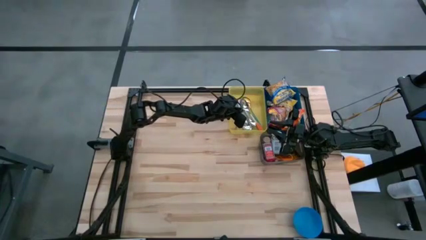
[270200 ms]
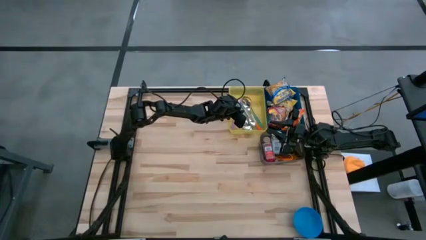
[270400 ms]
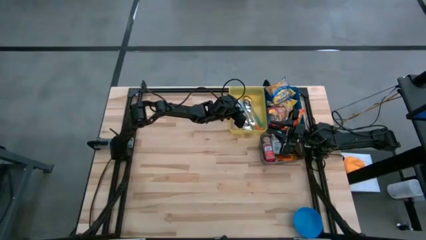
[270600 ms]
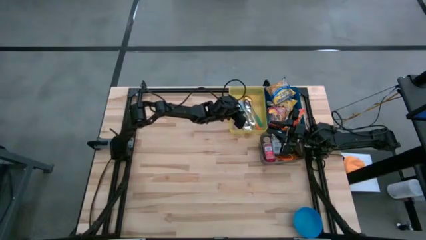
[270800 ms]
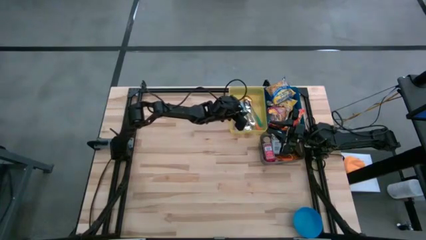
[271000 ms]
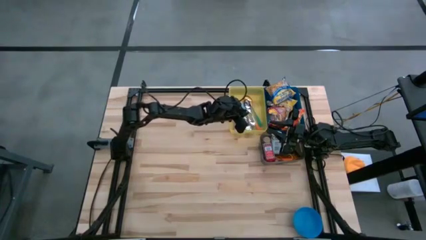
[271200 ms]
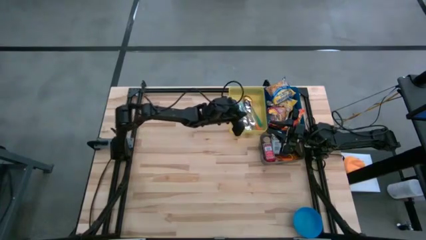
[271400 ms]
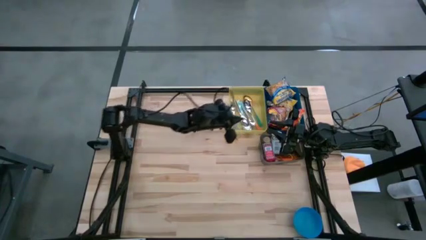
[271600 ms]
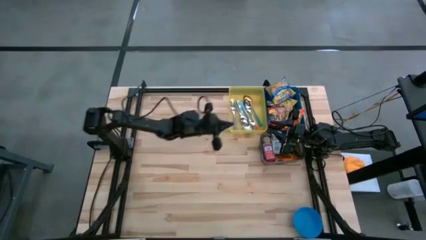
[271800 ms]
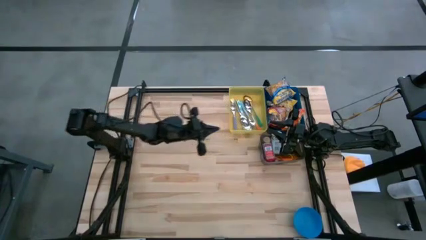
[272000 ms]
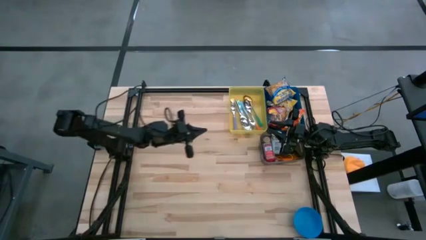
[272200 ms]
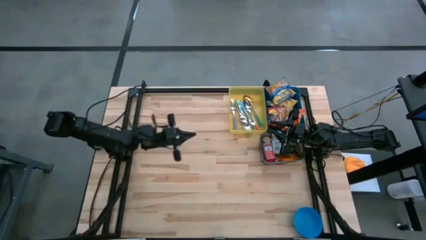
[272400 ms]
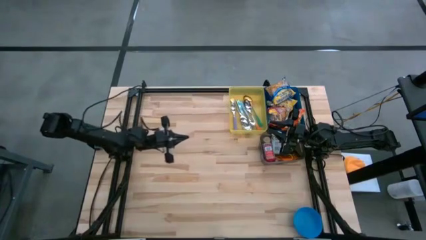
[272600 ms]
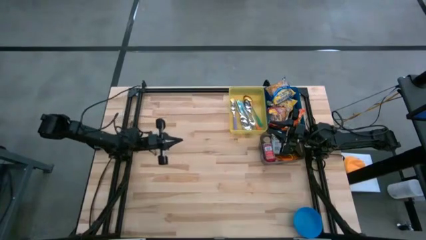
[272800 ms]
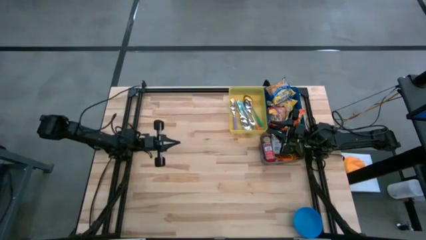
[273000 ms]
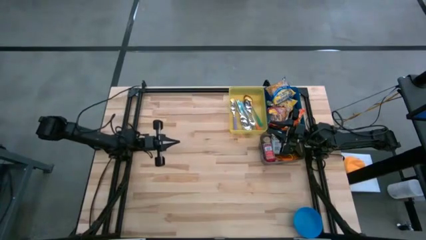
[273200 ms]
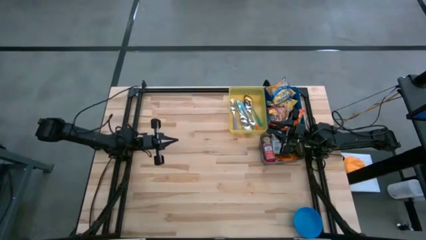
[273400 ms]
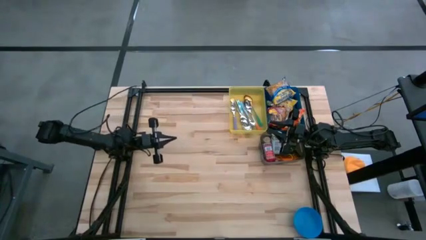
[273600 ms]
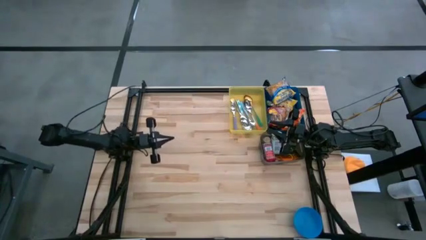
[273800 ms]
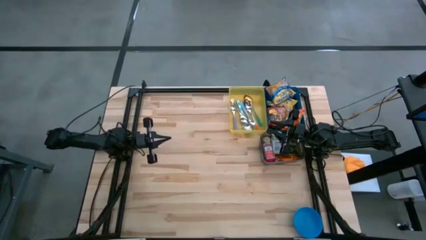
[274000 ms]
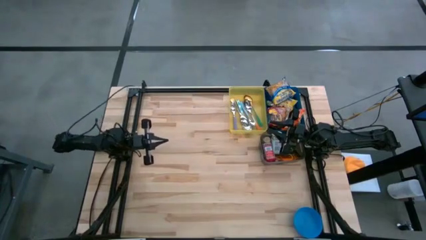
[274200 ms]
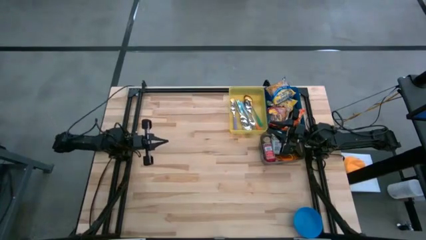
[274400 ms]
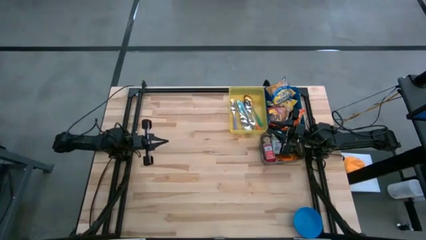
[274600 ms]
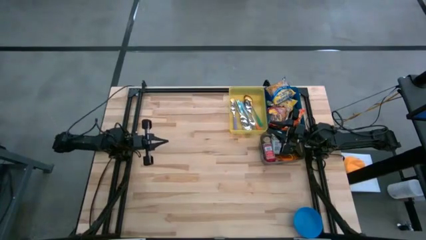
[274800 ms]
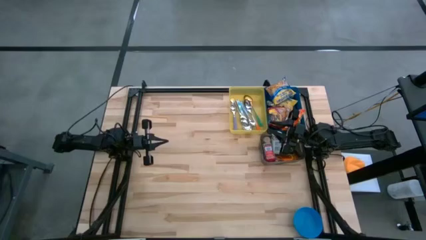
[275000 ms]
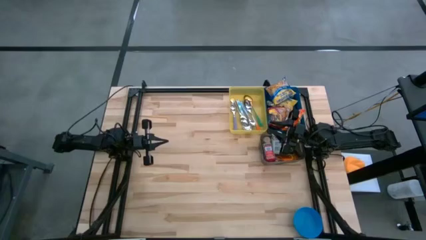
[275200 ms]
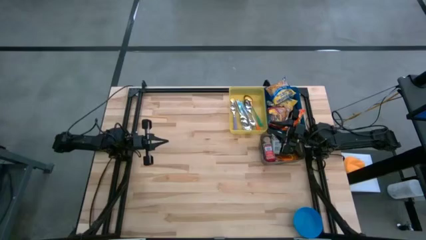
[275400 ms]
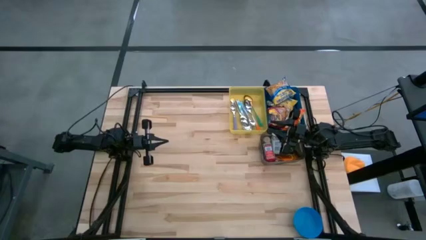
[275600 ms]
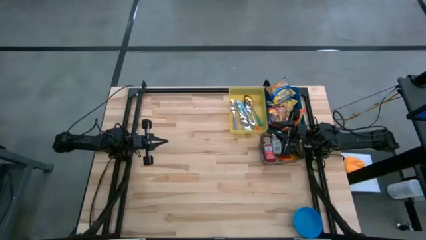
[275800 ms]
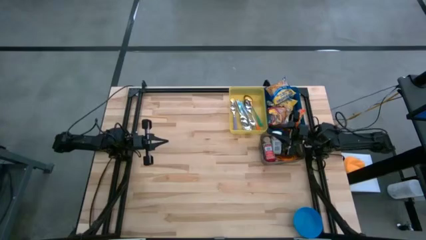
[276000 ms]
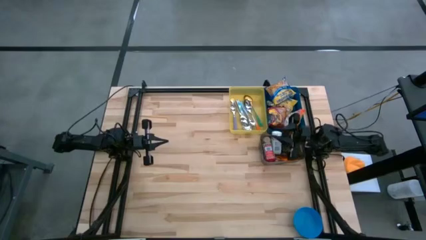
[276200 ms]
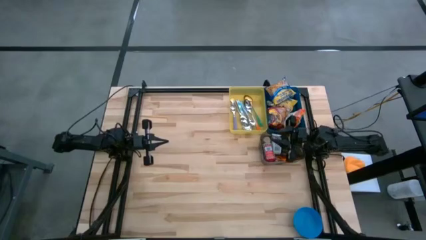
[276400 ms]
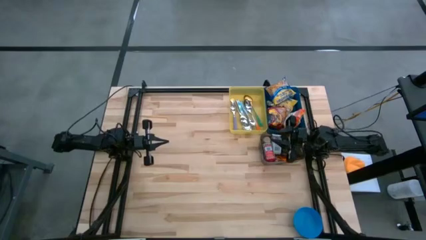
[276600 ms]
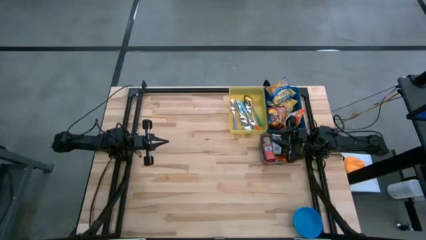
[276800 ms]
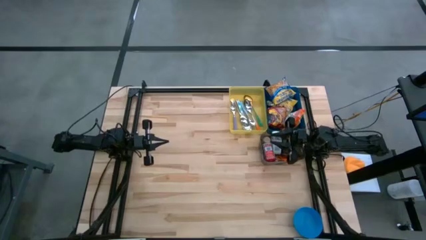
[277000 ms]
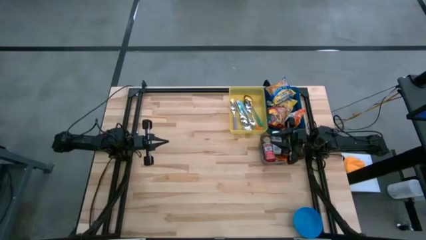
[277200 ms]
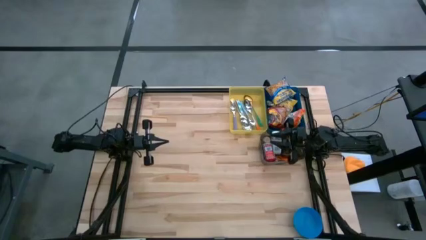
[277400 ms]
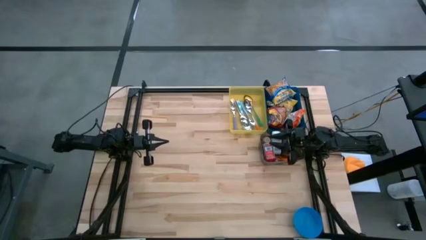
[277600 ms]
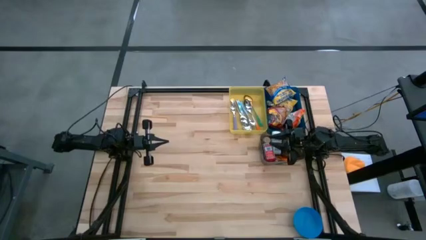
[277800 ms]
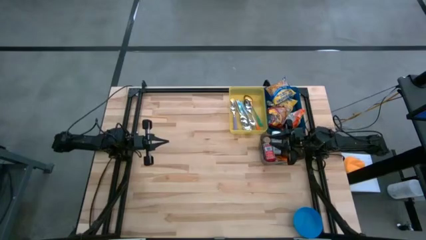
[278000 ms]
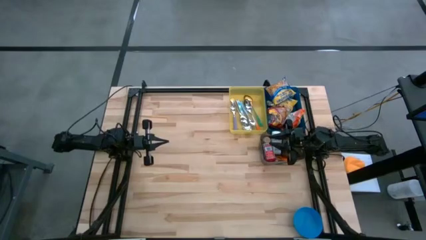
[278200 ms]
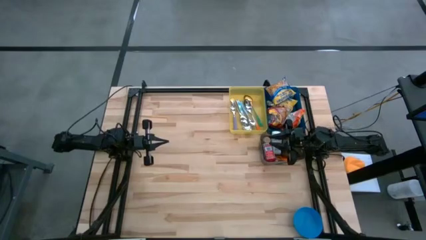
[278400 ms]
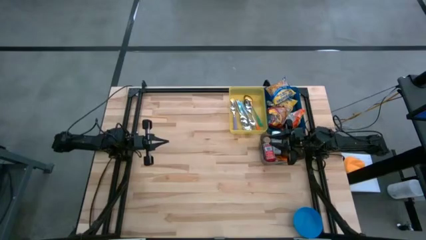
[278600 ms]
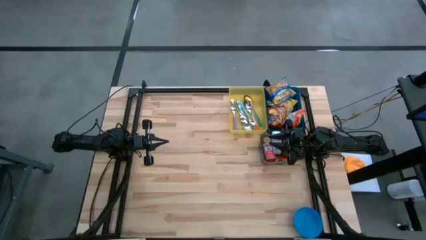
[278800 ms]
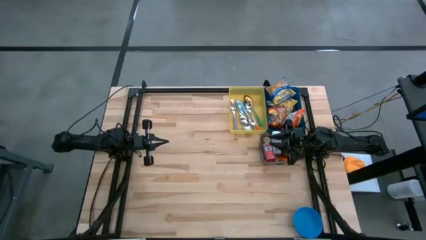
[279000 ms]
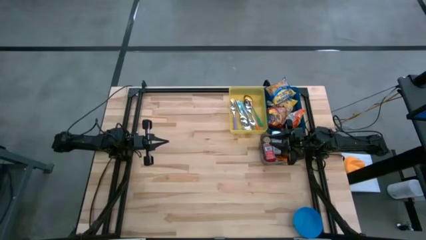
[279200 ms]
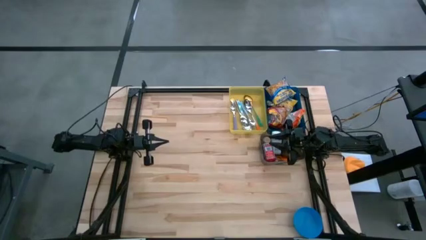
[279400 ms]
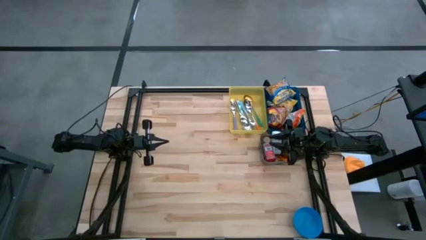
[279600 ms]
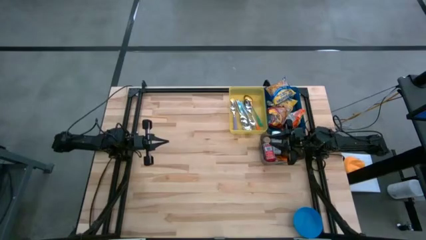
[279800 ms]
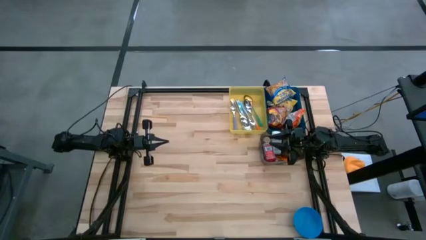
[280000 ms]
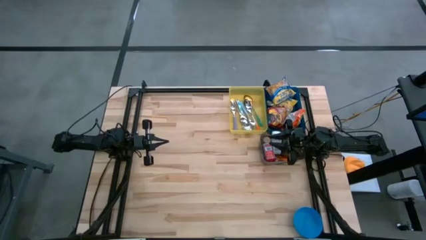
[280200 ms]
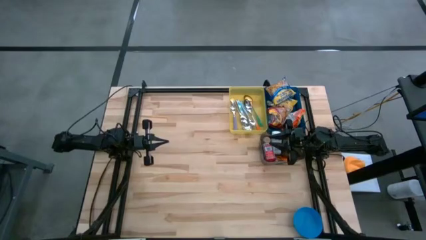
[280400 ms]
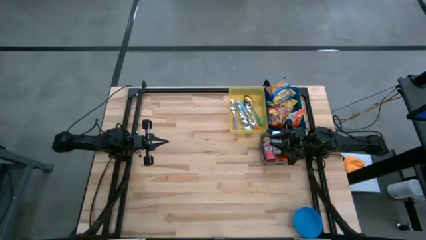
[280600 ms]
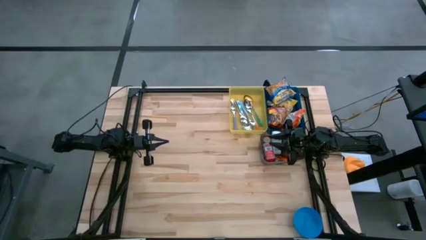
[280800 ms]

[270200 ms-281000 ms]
Return to Home Position
